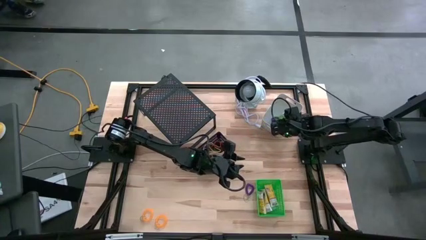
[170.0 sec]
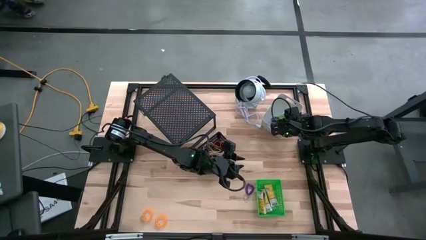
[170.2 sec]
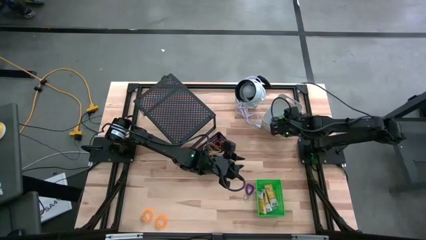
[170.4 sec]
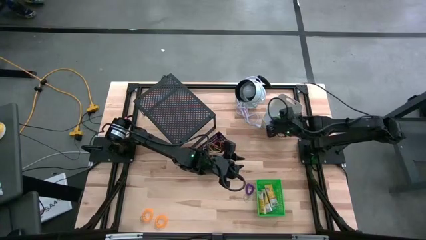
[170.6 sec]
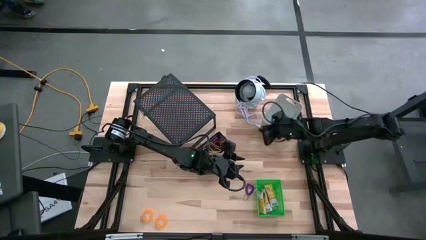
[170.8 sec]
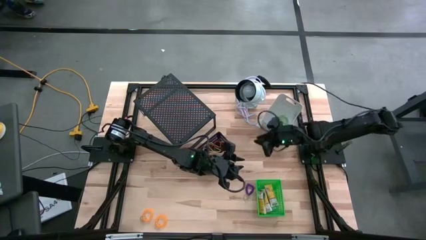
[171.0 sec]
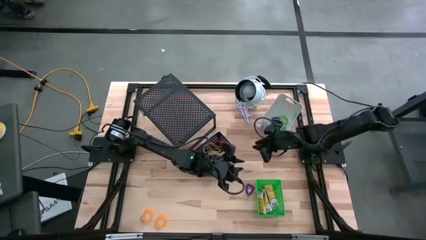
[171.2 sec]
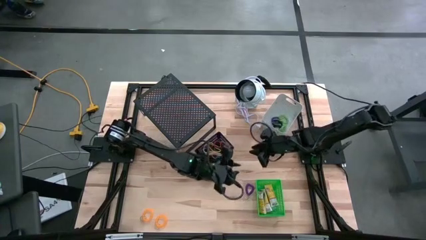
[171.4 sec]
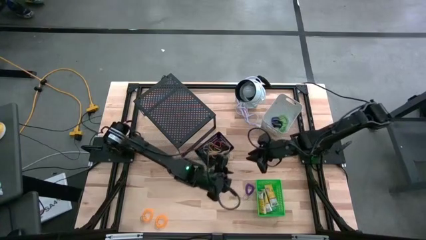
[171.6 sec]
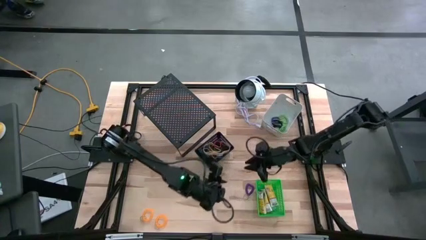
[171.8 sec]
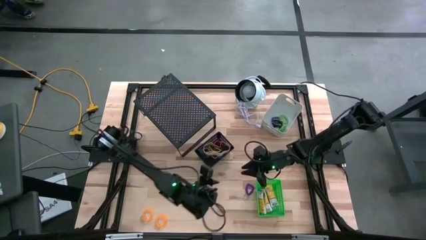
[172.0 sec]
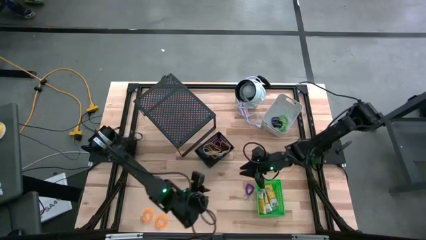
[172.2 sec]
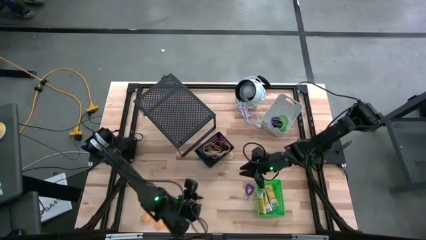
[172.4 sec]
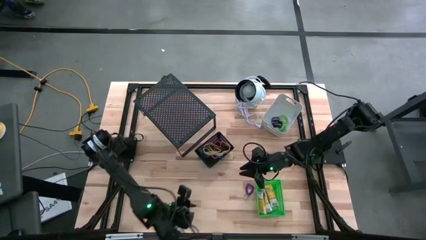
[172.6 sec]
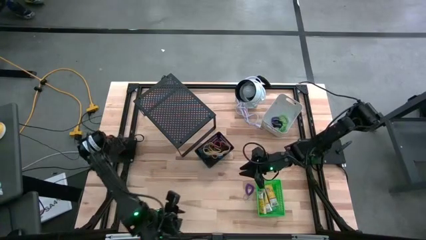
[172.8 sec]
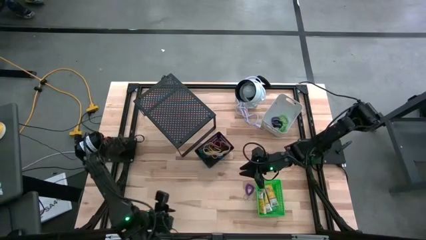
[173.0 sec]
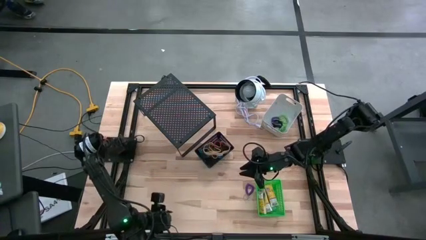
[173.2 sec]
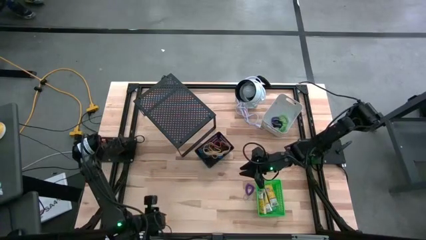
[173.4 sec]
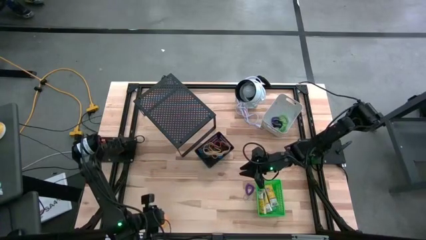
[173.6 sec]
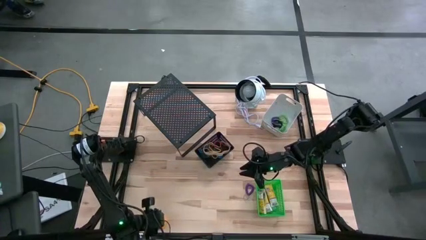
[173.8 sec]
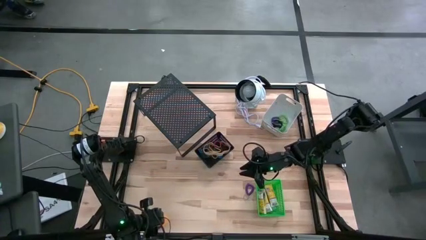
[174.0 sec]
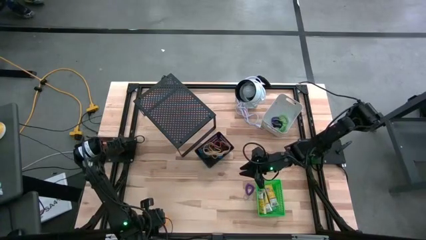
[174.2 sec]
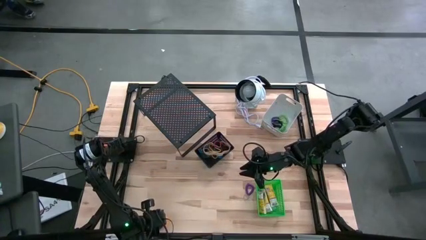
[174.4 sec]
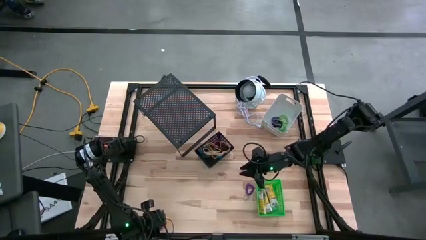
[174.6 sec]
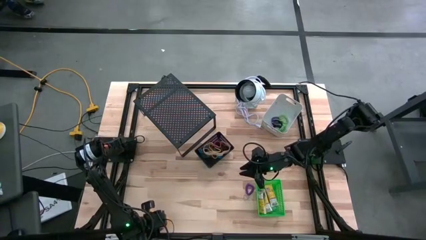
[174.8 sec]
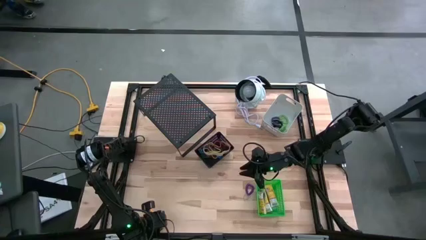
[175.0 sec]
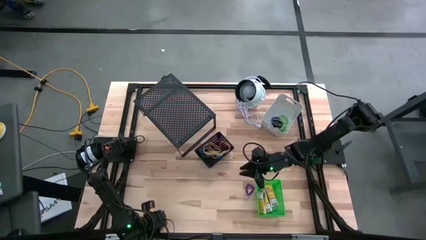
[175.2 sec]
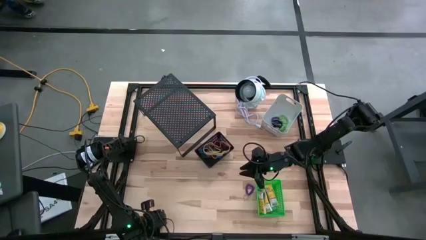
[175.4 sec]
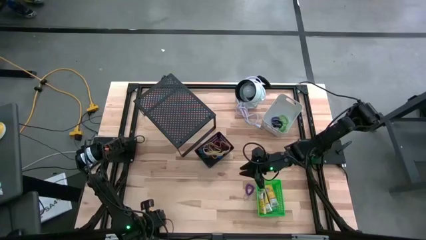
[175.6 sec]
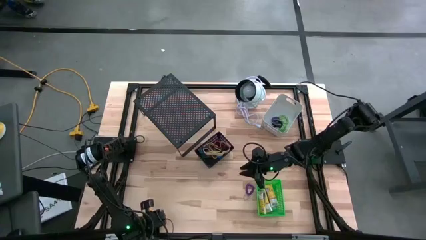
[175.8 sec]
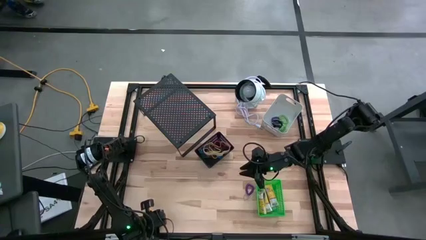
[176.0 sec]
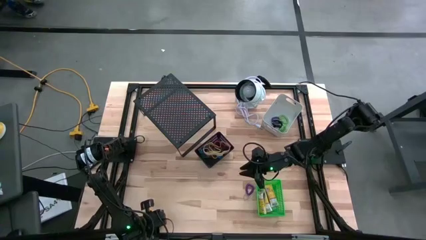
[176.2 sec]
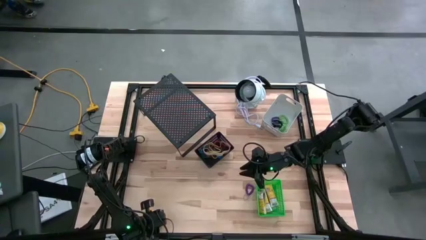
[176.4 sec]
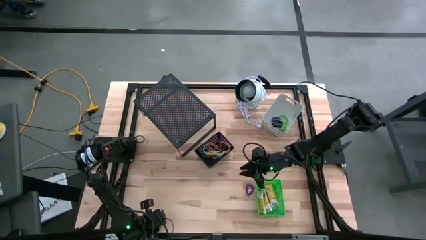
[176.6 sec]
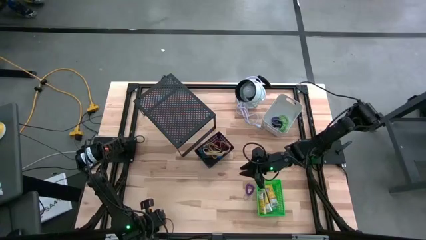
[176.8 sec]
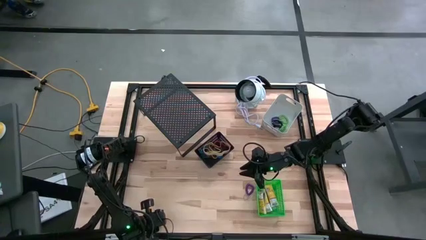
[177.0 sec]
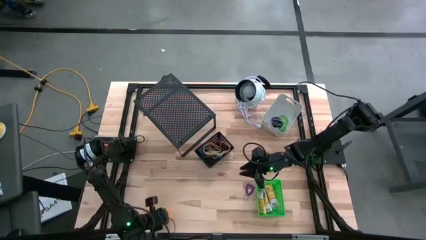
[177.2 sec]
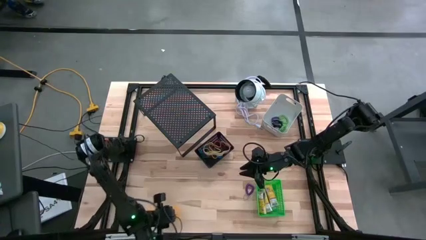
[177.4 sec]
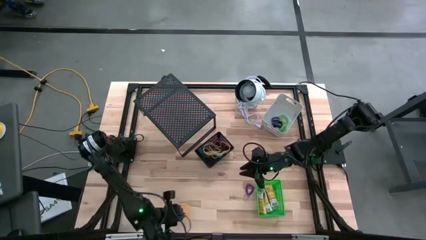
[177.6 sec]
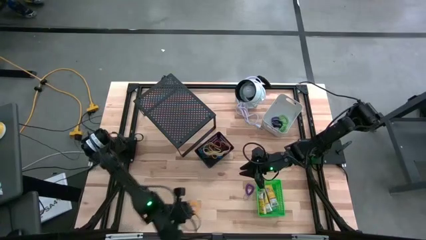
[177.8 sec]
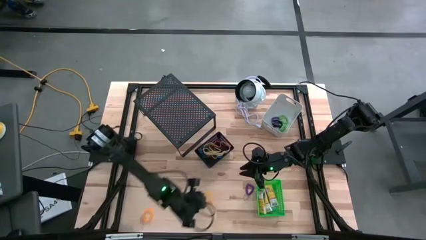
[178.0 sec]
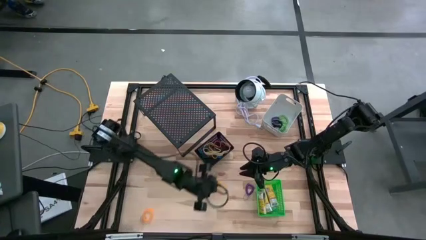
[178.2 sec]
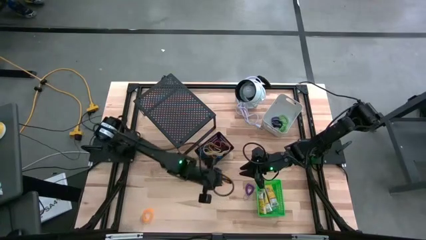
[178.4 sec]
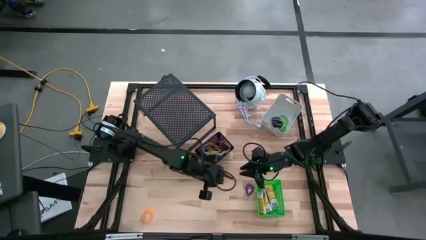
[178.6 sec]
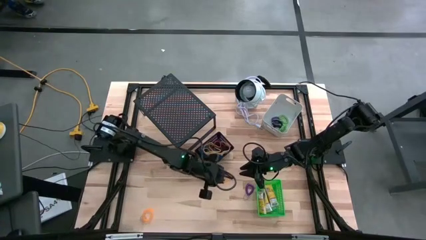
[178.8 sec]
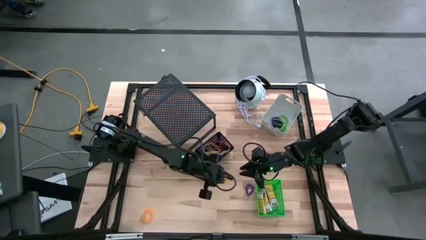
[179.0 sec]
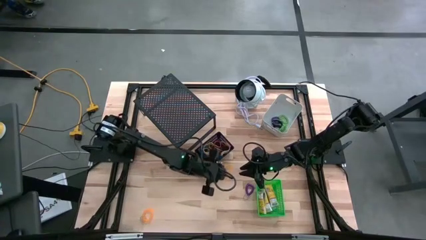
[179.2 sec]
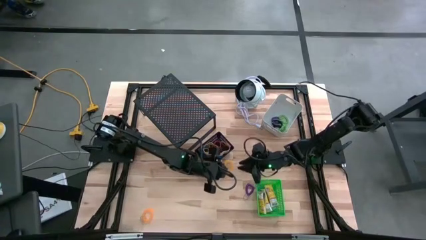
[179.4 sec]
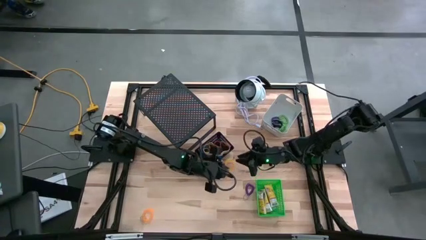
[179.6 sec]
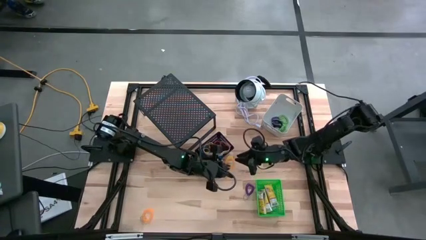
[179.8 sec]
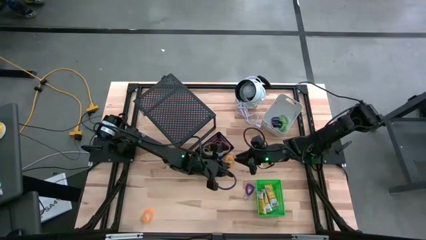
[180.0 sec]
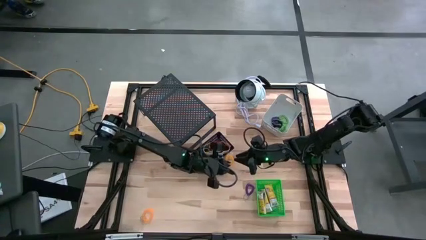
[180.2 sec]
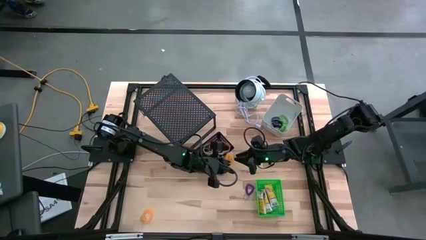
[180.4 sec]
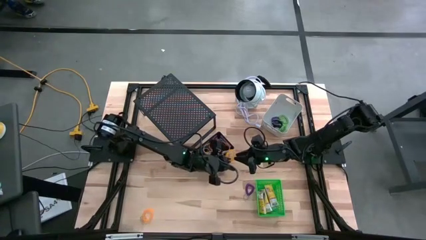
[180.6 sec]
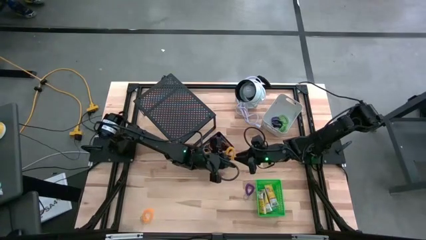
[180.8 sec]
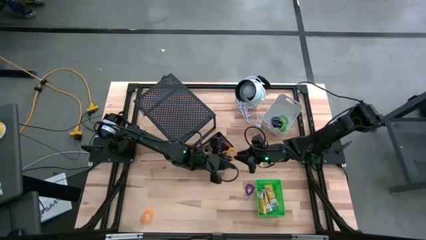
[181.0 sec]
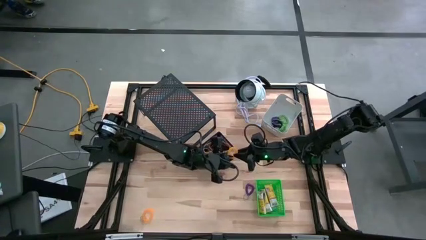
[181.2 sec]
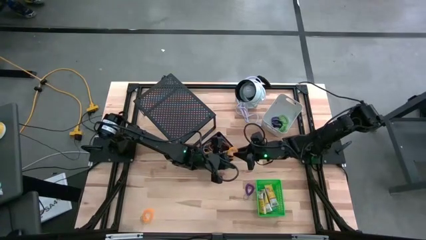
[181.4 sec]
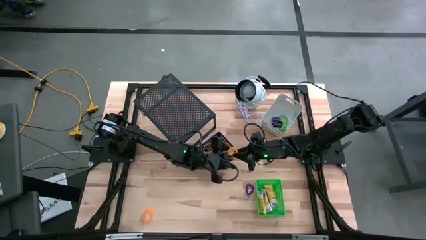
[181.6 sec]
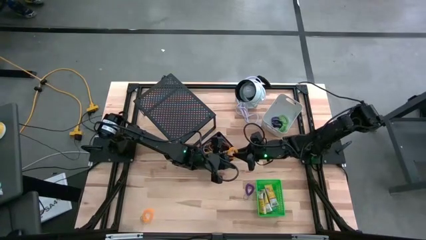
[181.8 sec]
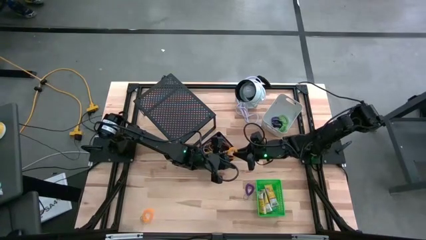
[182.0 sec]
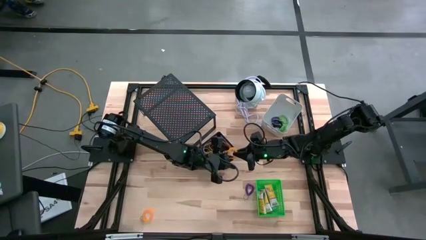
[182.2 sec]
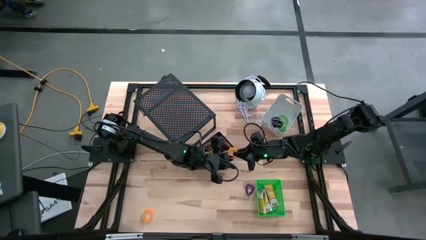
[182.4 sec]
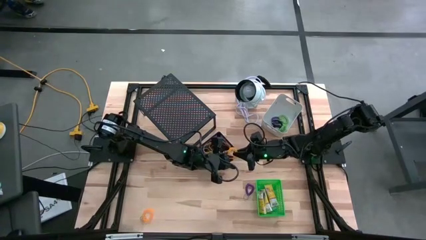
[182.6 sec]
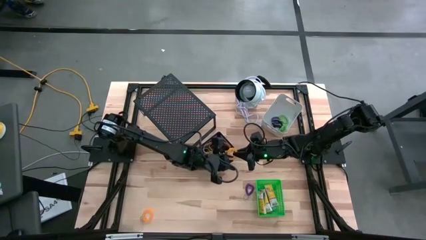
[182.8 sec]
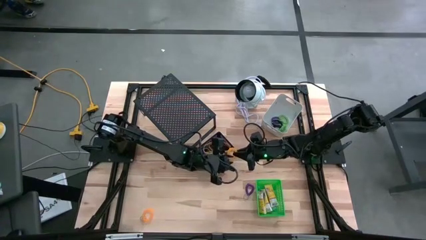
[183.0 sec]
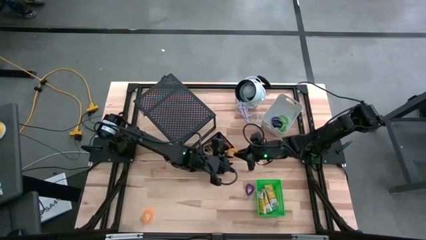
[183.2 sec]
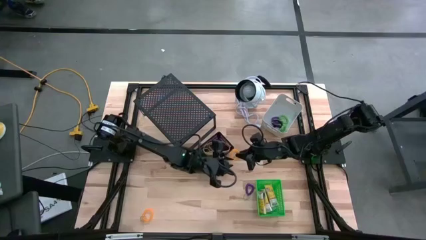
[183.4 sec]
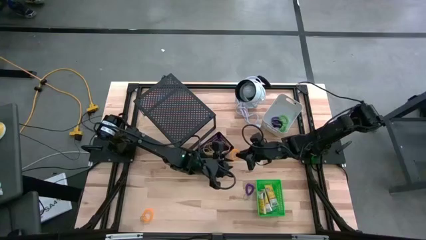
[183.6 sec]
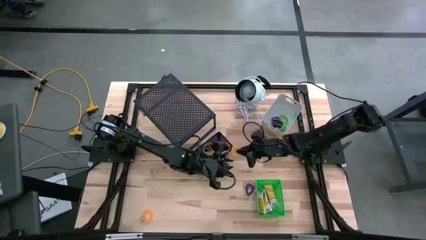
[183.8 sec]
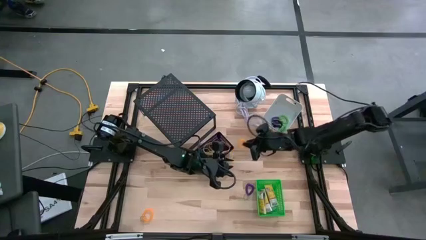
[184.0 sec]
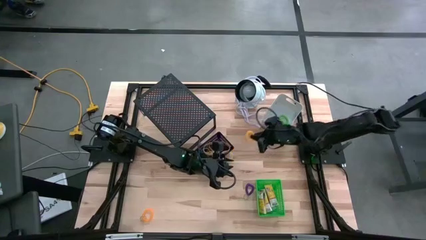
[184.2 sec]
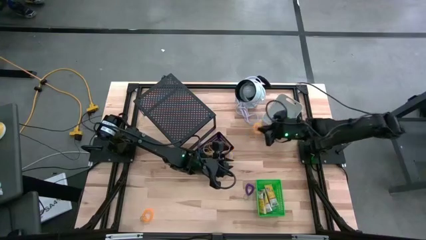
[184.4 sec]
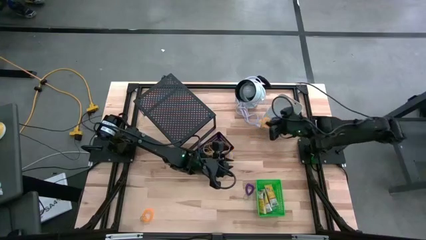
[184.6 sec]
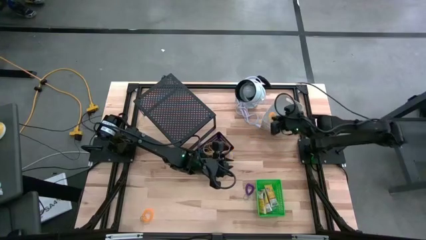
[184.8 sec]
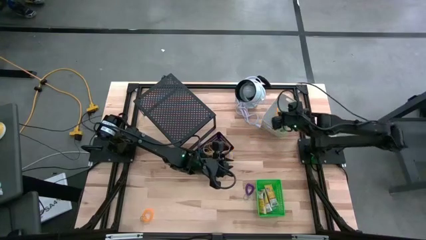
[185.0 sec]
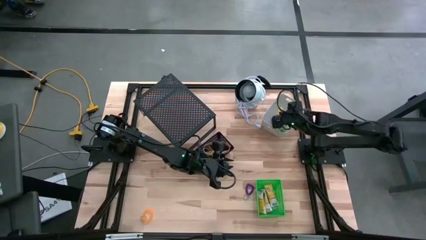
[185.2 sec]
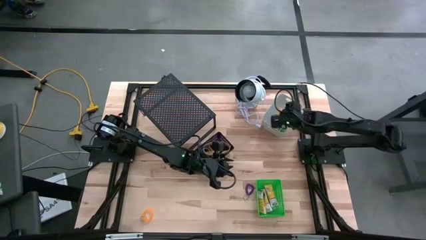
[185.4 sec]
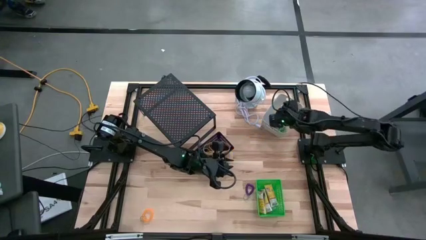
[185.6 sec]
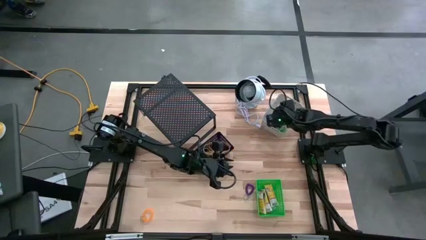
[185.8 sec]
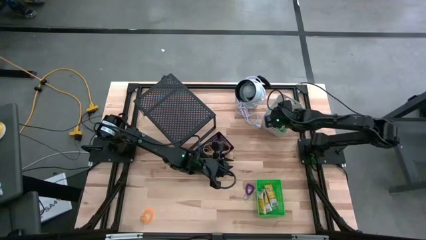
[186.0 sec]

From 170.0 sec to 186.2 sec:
Task: Pick & Place Office Desk Supplies
Put the right orange spring keychain into the white bin
